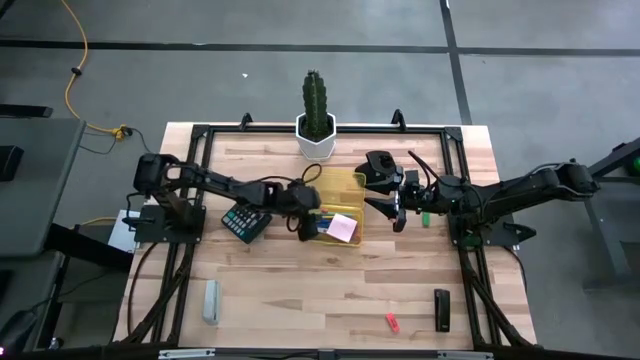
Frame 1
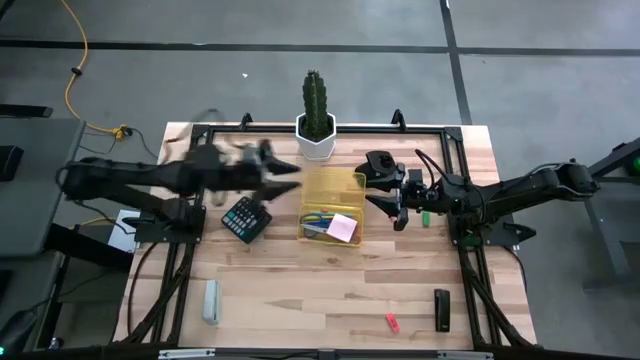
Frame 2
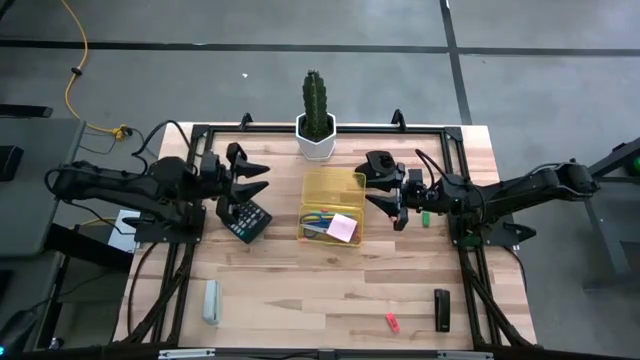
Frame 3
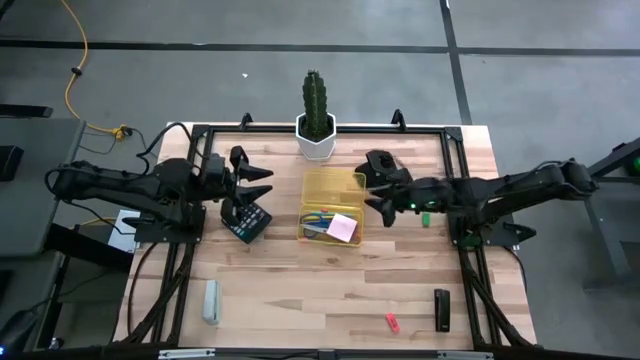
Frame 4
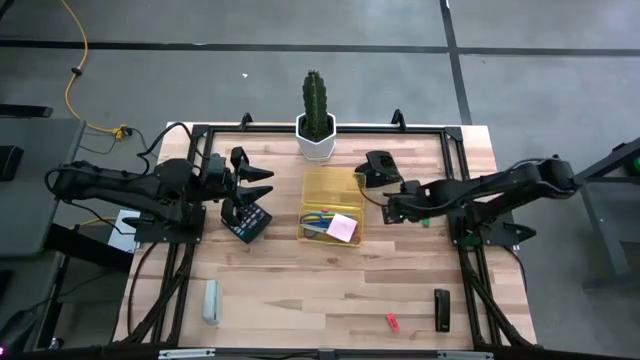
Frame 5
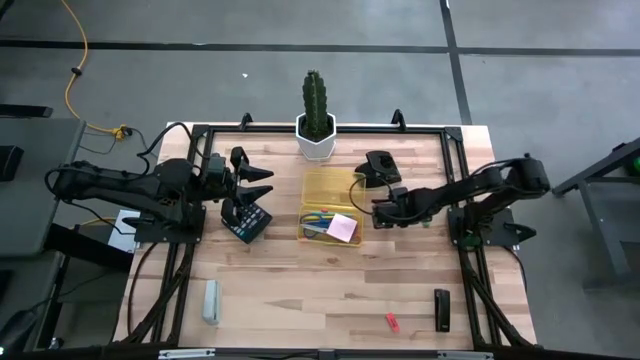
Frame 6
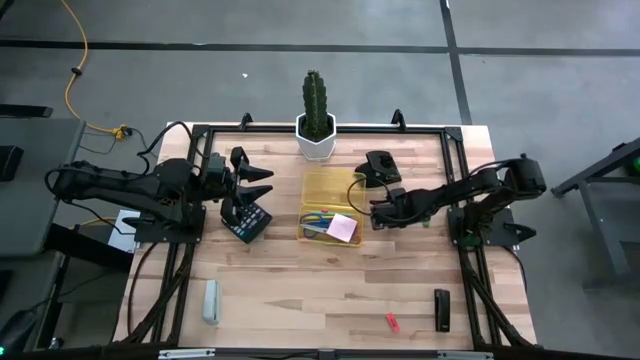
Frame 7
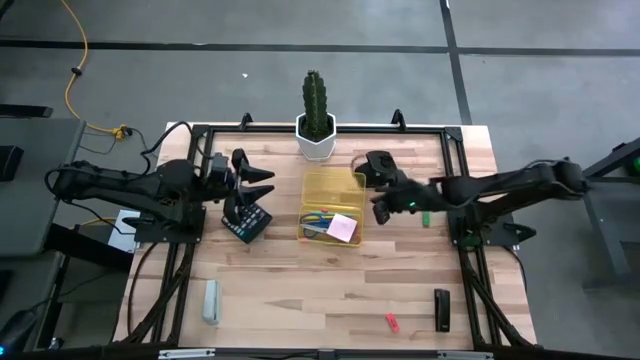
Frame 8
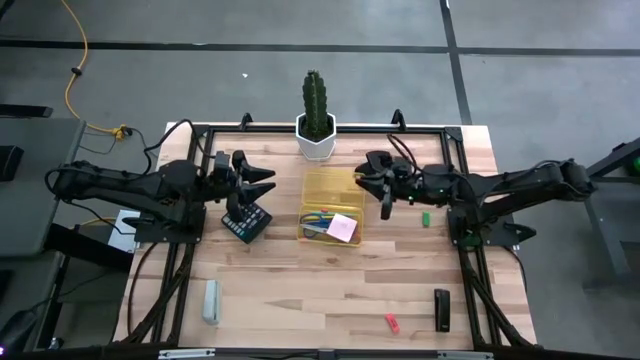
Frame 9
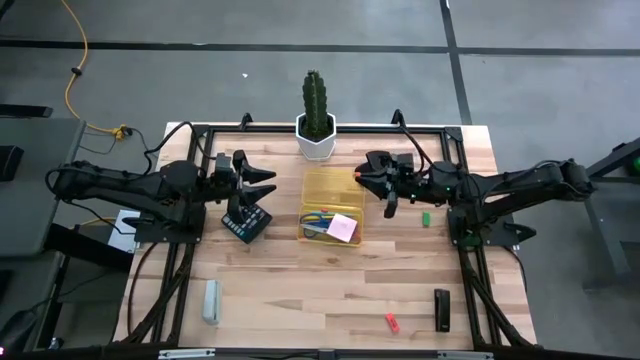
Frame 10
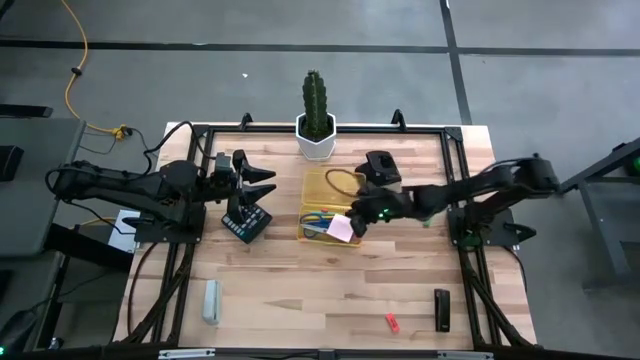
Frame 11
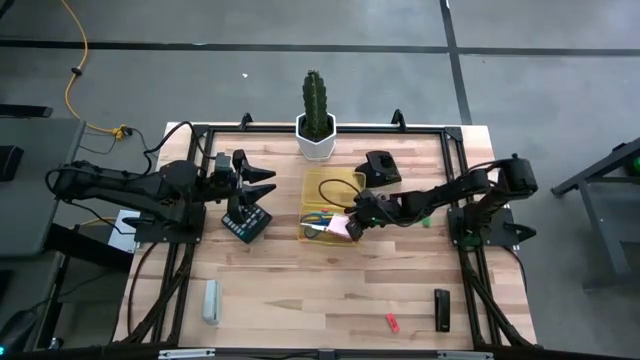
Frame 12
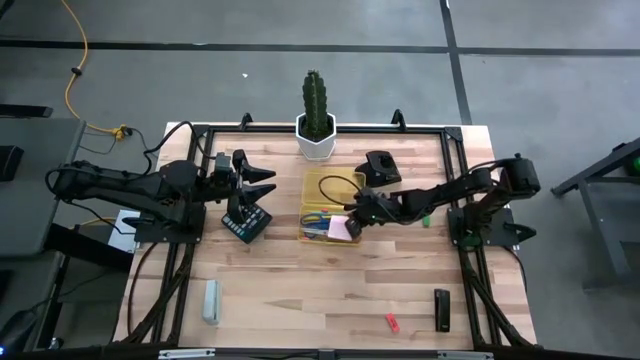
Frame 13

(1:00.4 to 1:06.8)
Task: Pack school essentials
Put the orange pencil top eraser into the supply box

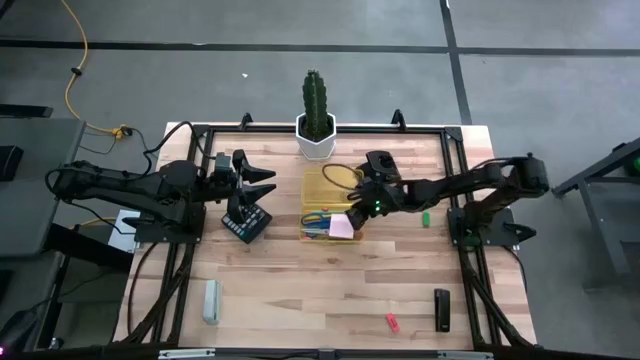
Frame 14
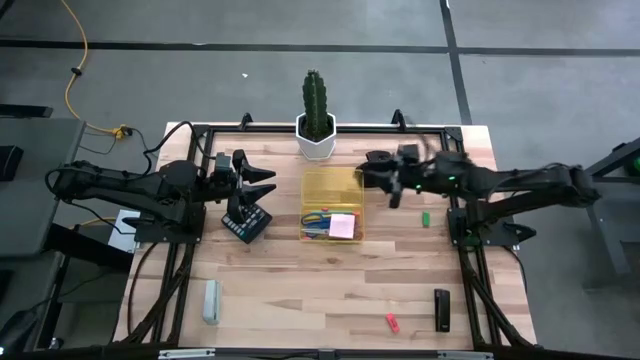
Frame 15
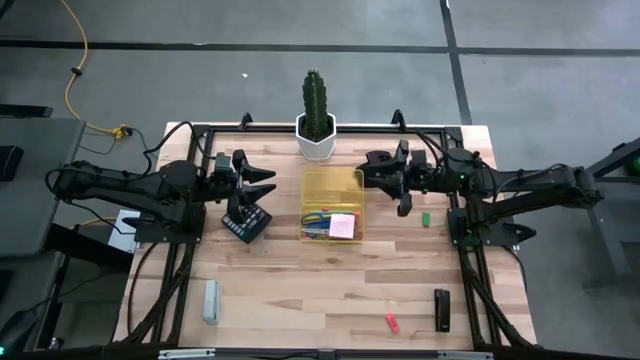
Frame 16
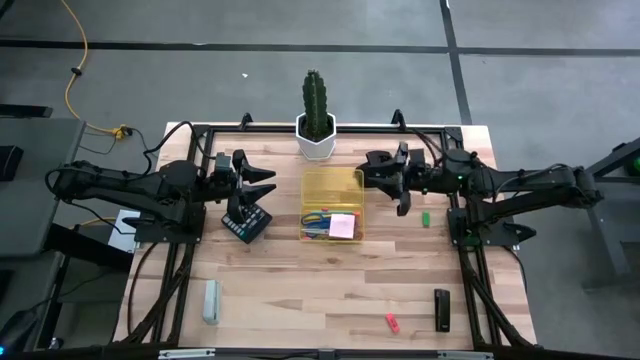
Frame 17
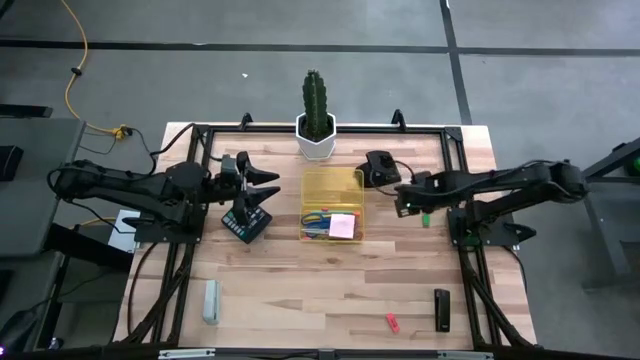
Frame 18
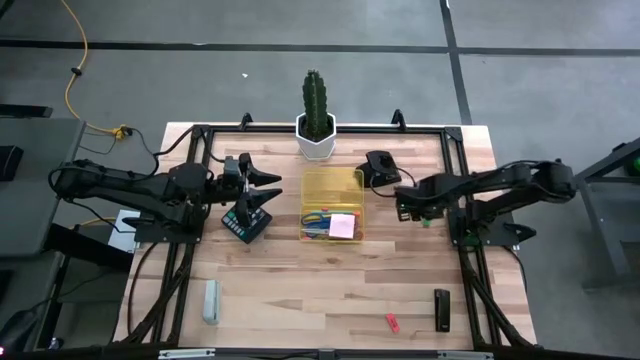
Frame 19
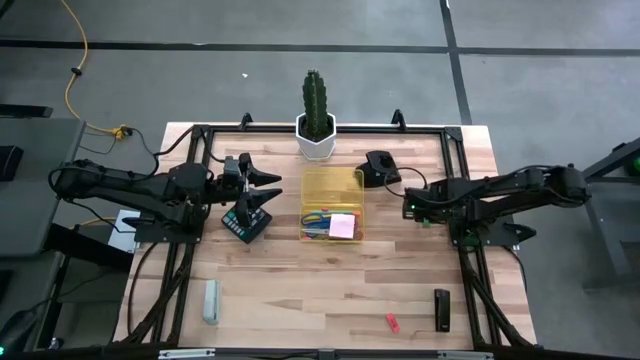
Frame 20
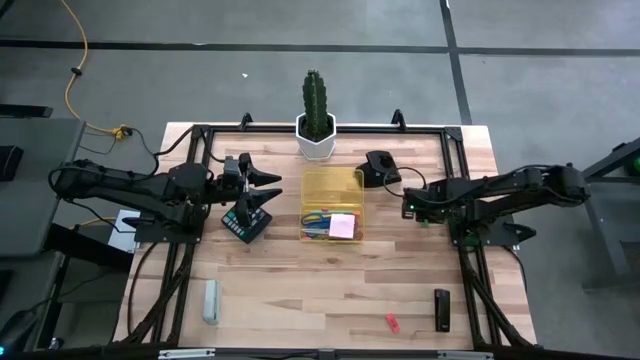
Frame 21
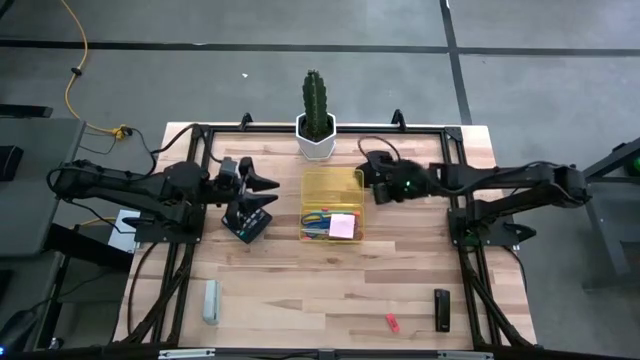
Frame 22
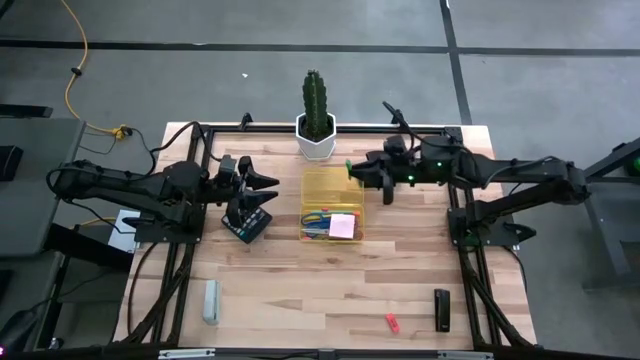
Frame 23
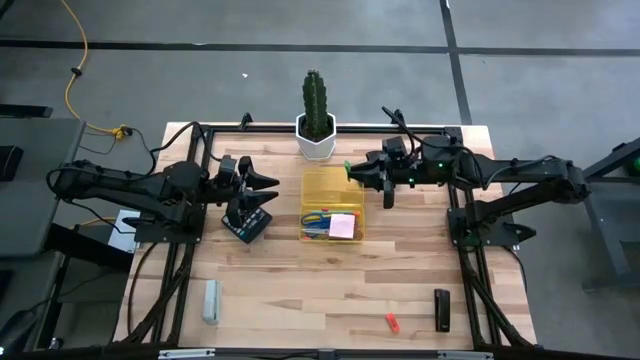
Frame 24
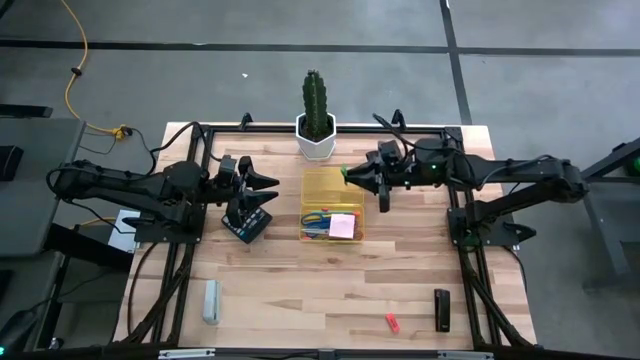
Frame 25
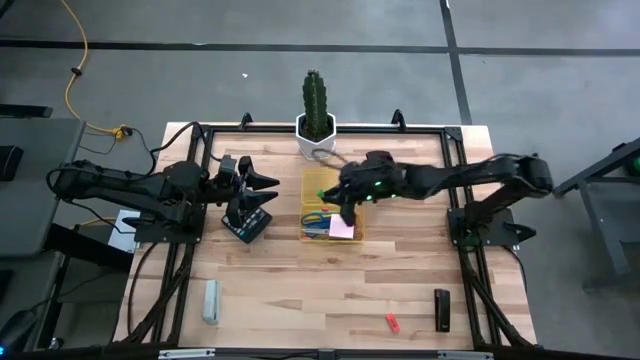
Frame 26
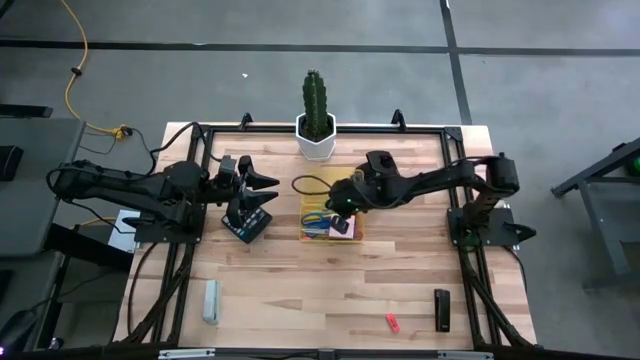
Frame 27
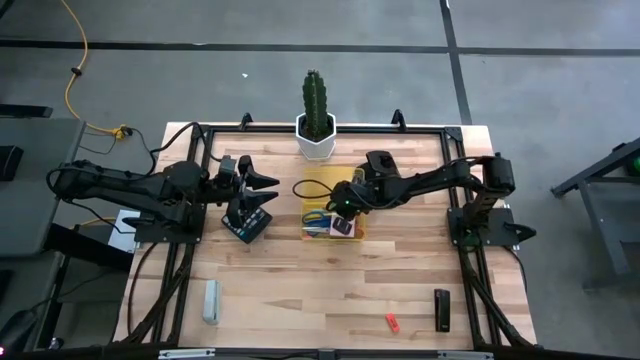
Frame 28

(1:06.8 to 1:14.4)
Put the green eraser into the supply box

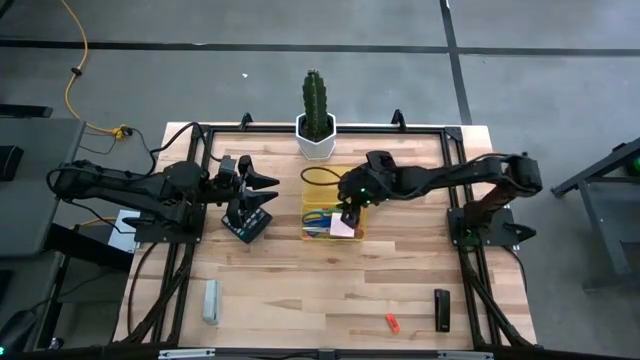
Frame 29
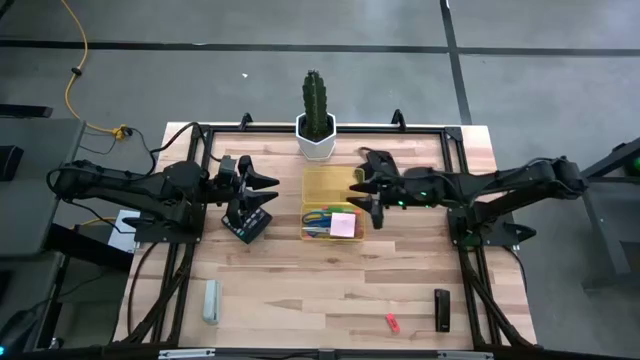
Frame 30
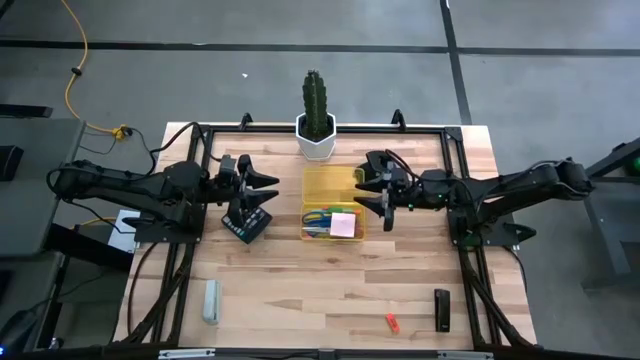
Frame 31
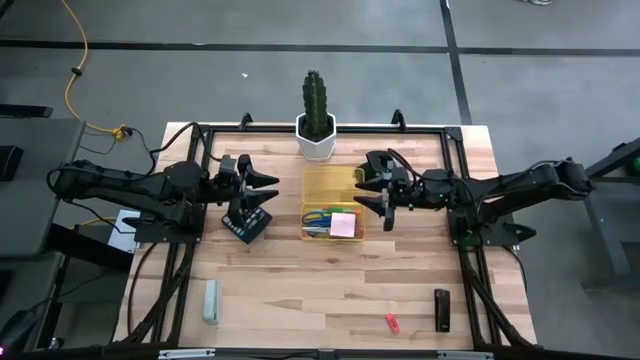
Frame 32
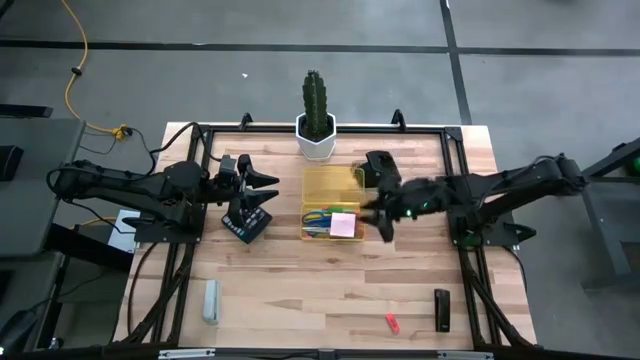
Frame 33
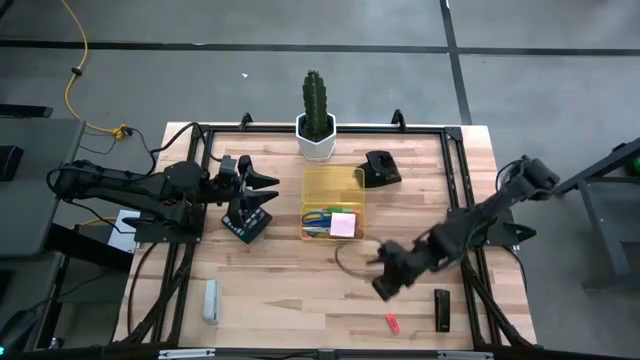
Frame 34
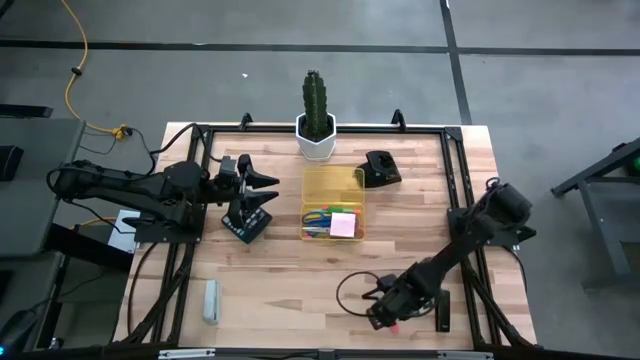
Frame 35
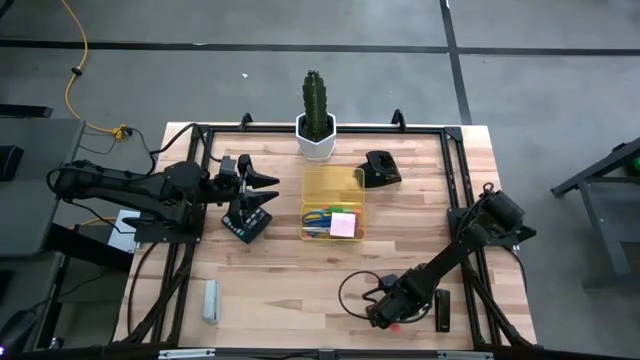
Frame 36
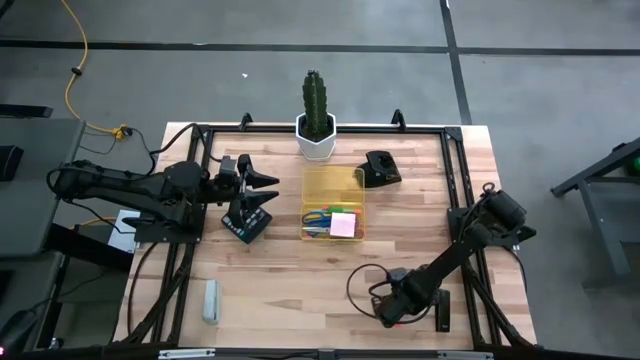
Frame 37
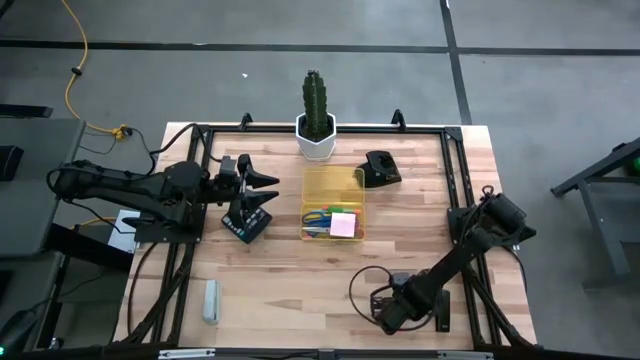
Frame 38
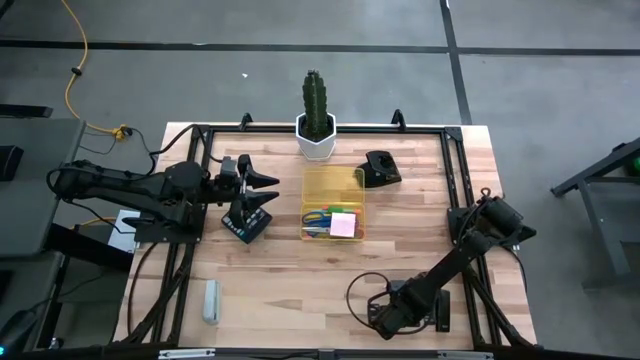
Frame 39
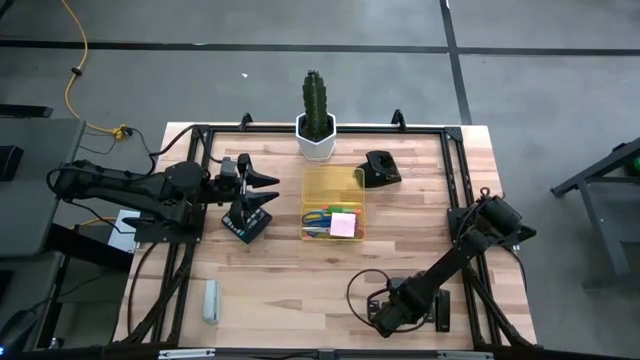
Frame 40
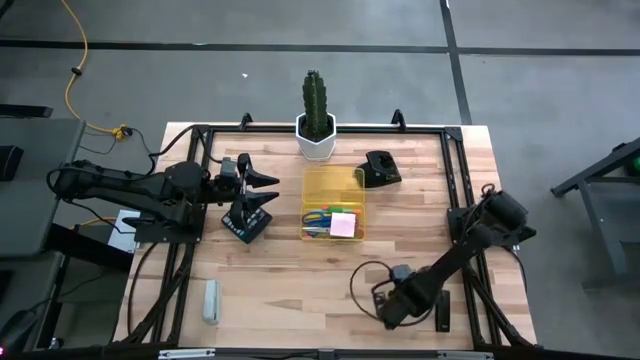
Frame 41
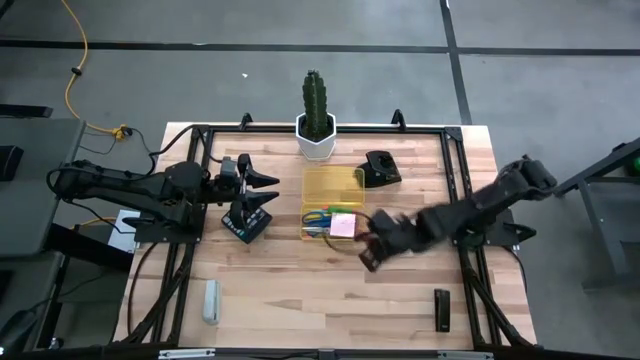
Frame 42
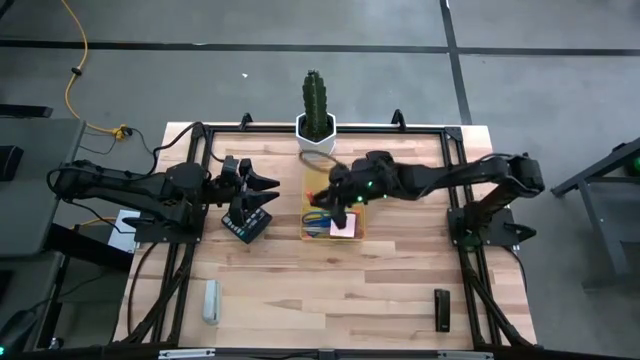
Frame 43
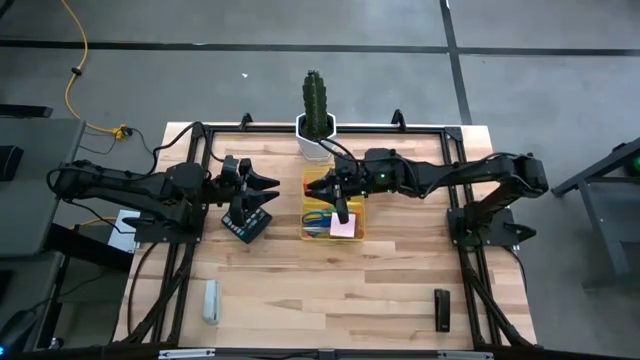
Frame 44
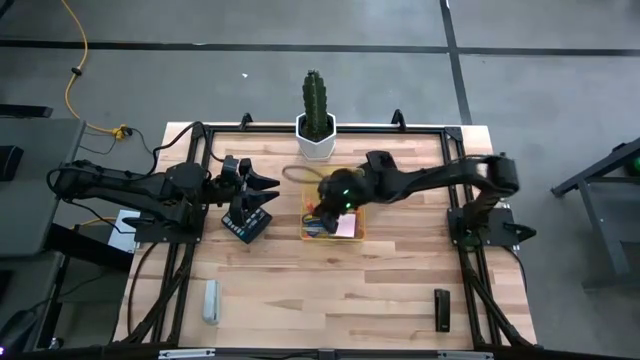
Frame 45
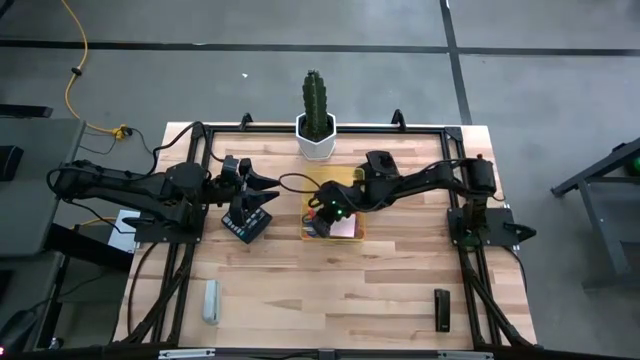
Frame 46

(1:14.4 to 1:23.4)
Put the orange eraser into the supply box
